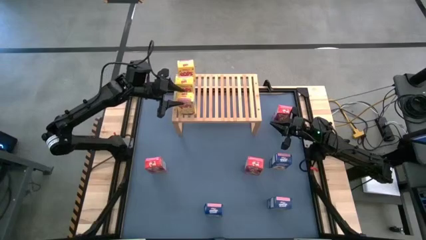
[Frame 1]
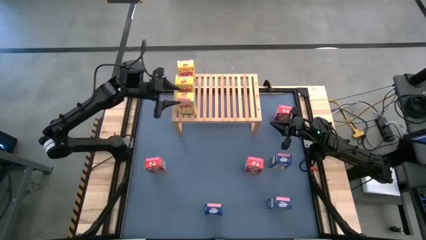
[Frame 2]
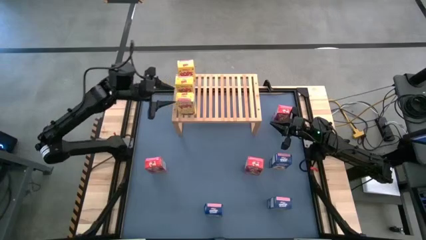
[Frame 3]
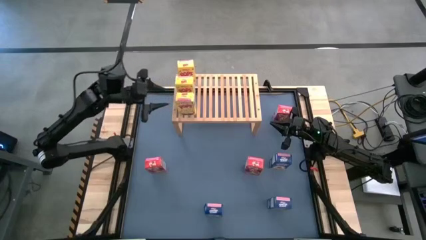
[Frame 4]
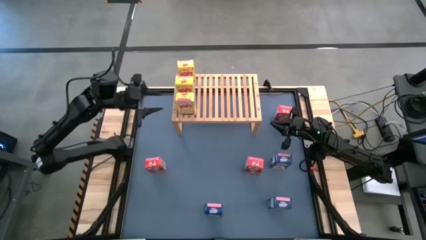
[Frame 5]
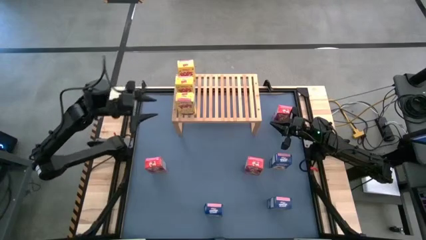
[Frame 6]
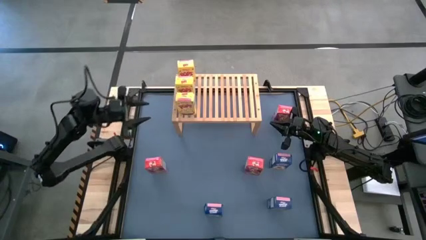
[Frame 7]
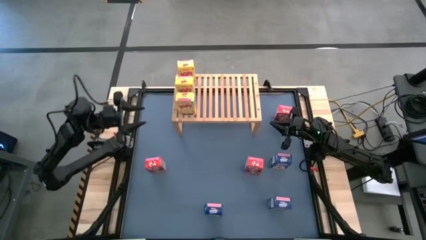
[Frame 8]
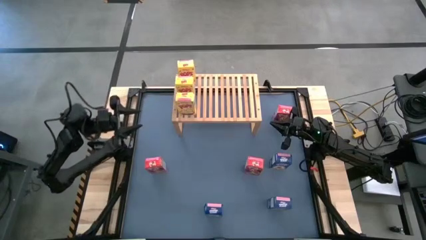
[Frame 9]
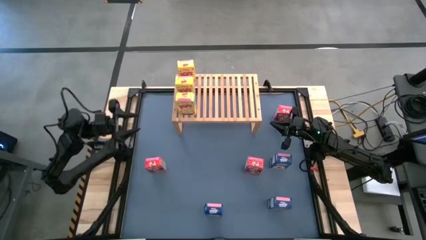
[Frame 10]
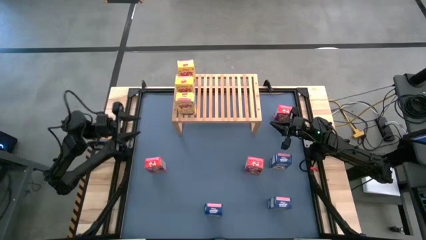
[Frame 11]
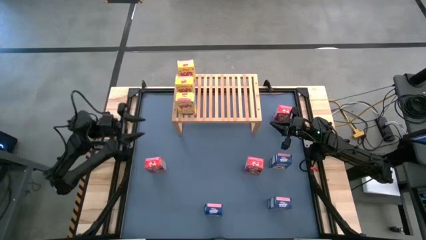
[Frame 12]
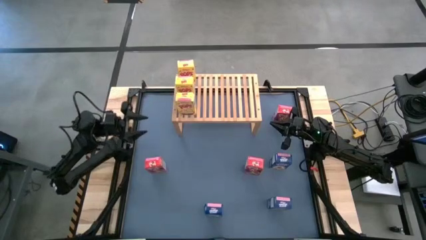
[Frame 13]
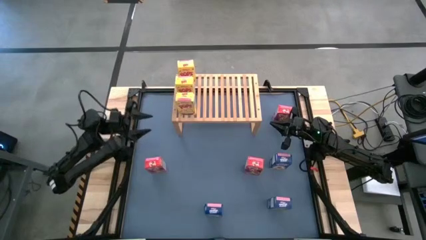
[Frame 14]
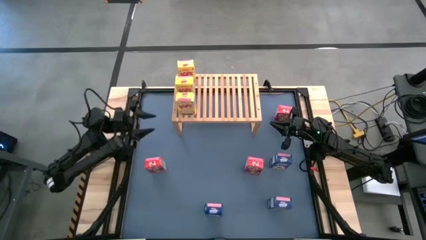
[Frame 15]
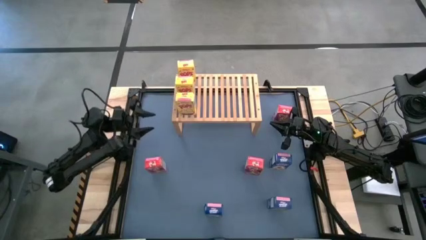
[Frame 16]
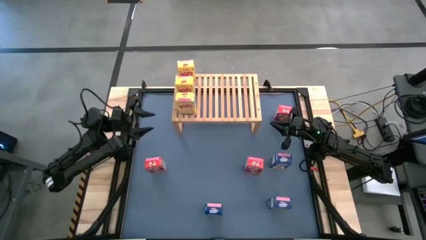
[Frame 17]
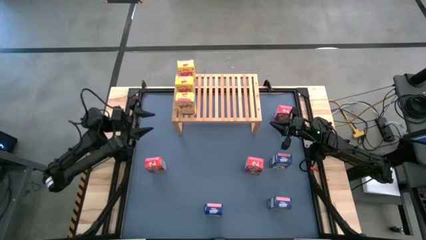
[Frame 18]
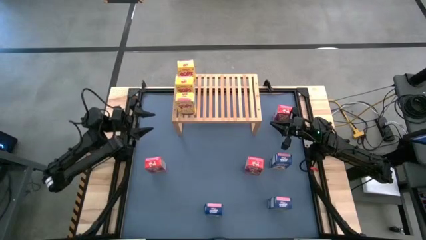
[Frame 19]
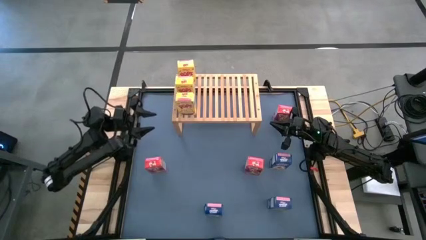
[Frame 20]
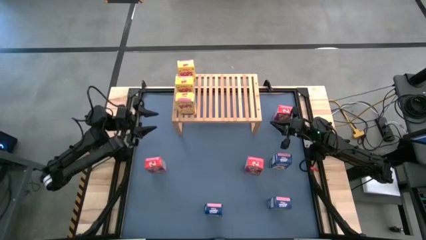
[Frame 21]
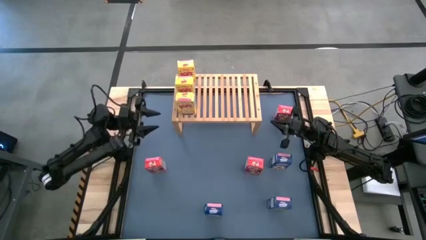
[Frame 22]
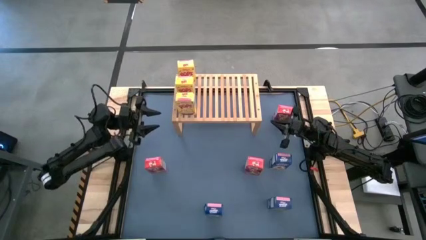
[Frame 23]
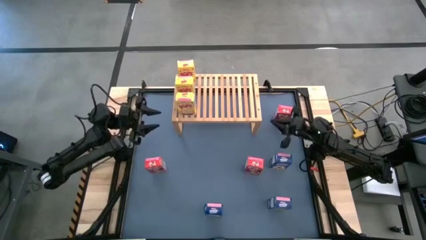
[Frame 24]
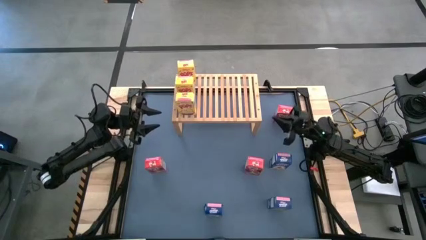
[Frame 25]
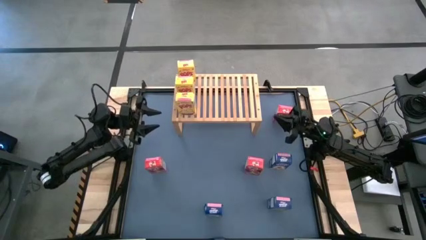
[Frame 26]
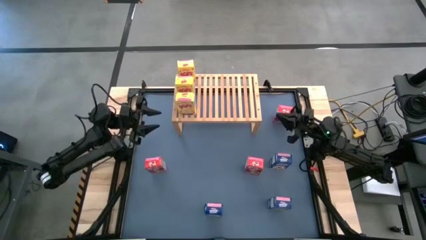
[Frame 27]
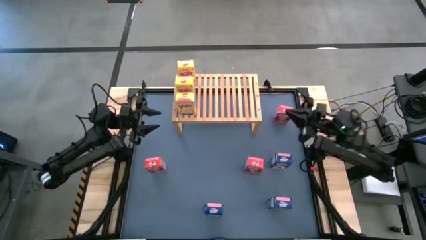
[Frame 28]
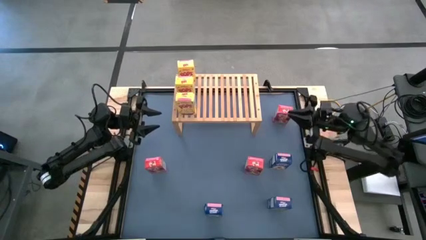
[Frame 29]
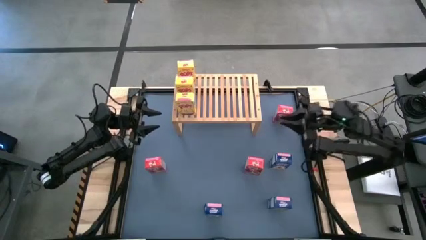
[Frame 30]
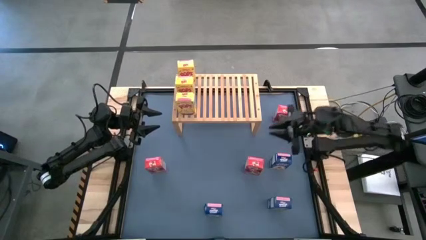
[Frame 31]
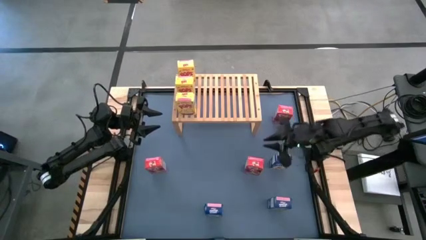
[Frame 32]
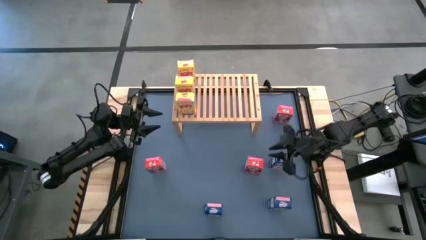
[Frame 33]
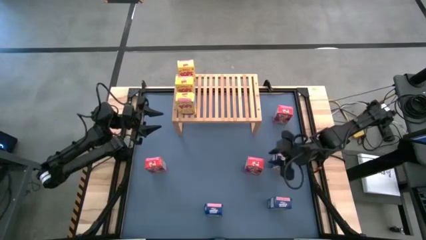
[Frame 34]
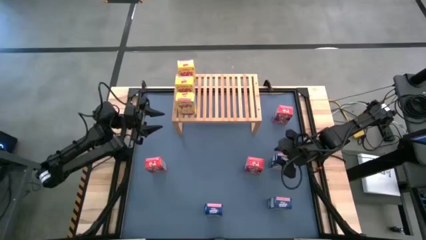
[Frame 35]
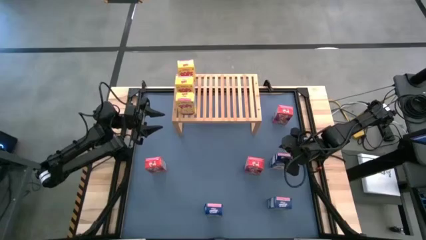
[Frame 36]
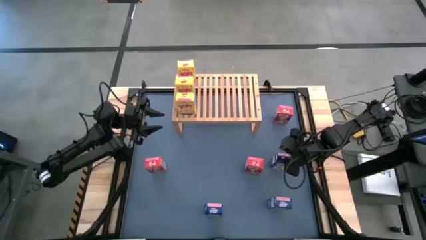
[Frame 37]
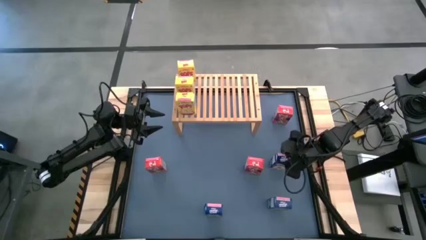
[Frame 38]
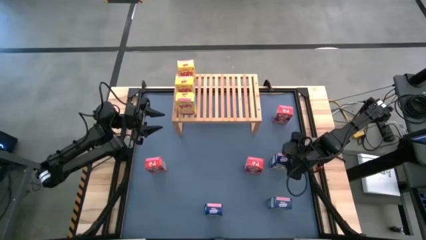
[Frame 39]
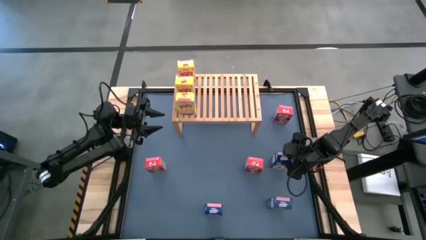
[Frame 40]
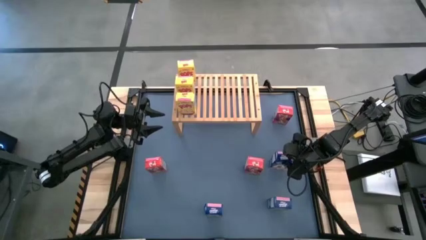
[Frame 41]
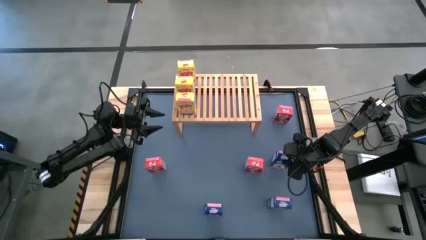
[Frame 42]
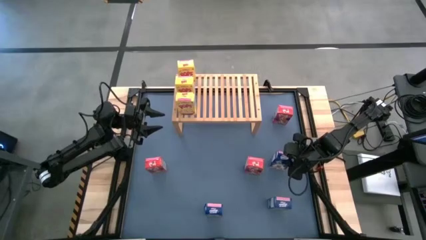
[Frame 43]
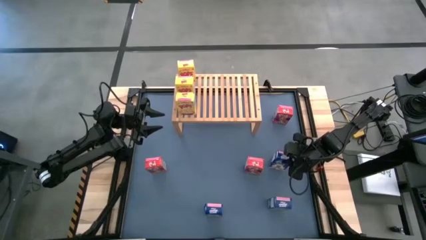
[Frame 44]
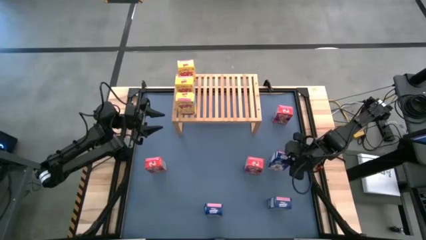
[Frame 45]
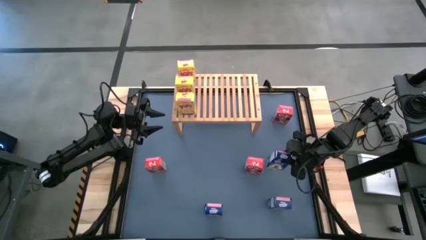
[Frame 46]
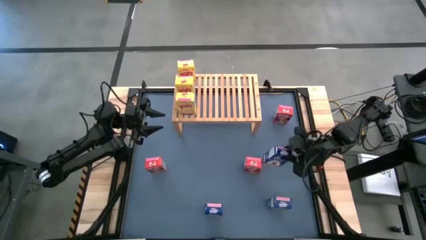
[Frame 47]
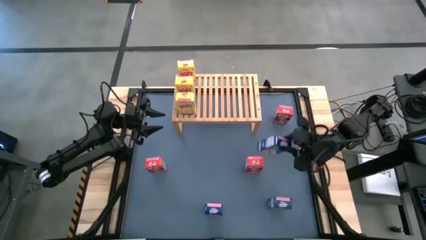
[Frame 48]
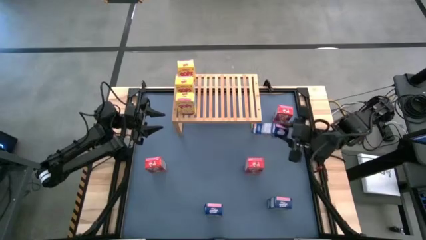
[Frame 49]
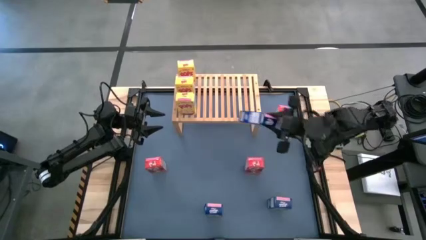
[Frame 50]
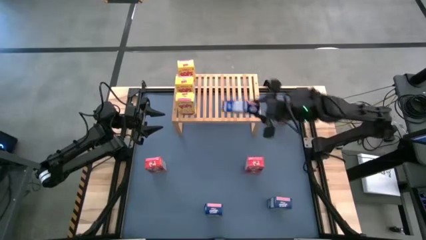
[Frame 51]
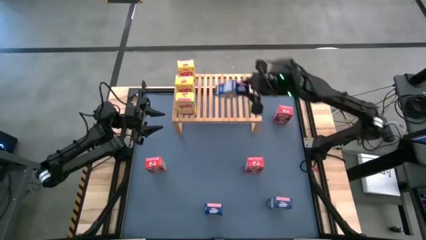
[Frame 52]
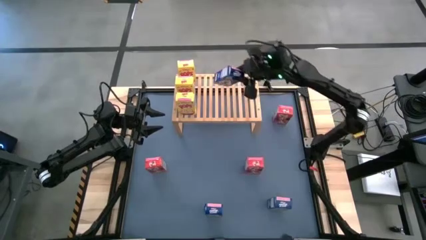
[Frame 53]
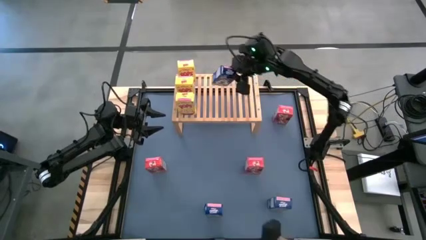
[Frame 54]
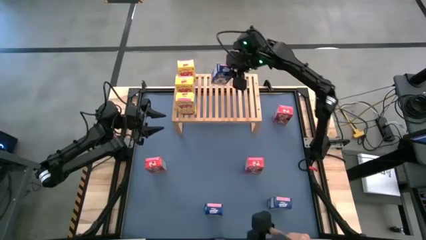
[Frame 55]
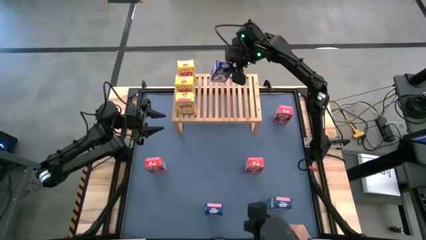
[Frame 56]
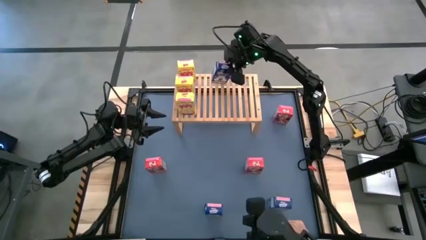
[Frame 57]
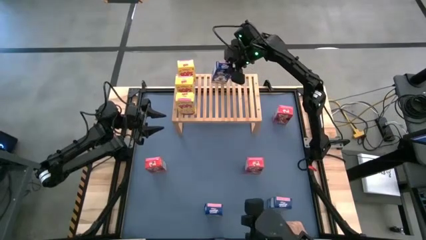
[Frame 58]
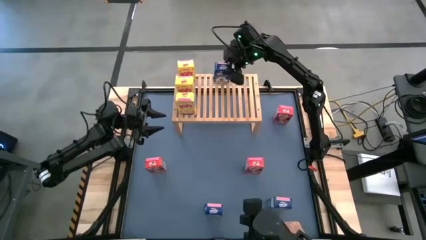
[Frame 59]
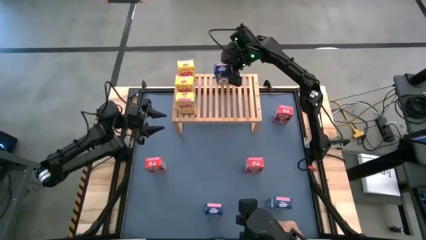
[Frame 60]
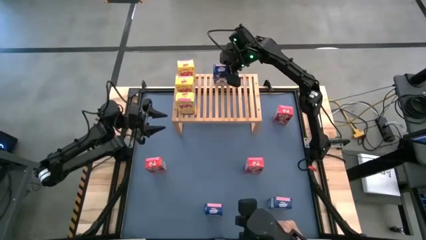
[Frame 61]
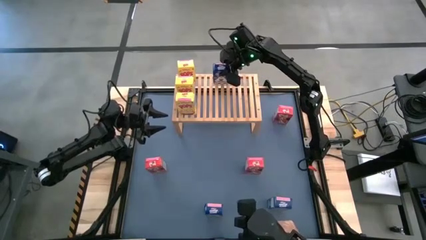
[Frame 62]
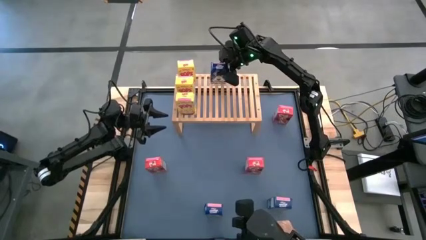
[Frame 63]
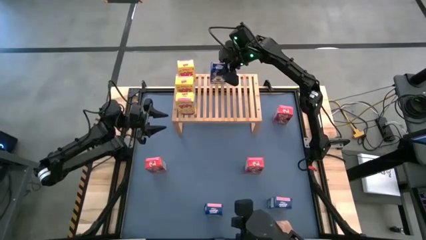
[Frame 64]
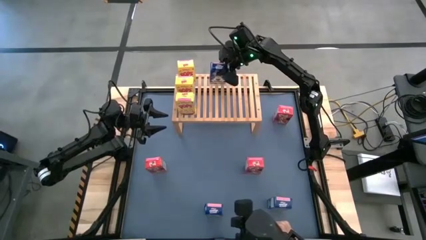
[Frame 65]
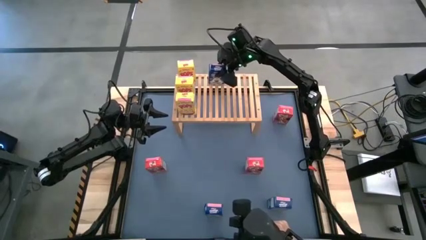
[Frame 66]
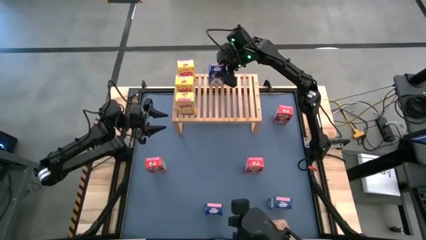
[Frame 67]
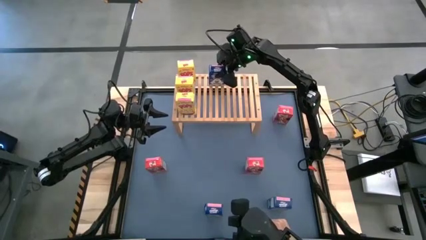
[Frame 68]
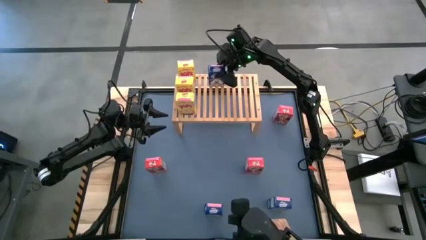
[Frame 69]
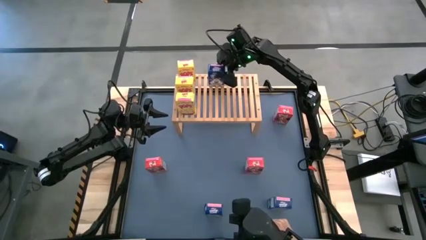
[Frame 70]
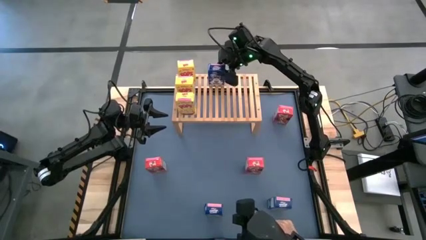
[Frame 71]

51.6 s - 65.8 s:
Task: Stack cereal on shelf
Put the top right blue cereal box on the shelf

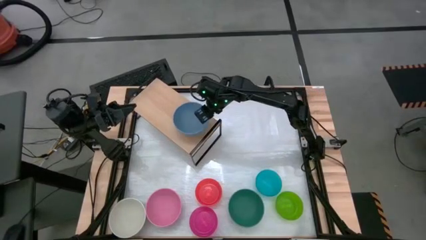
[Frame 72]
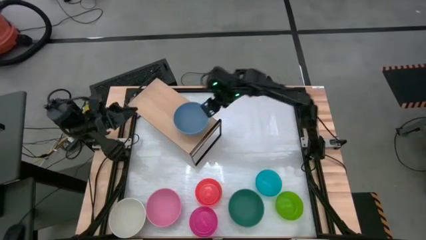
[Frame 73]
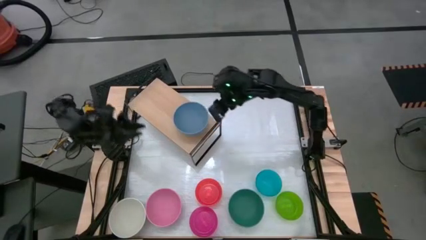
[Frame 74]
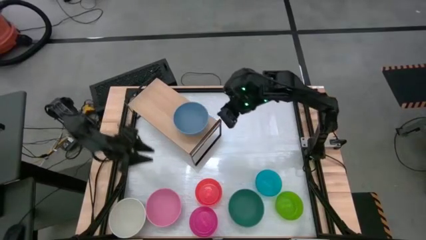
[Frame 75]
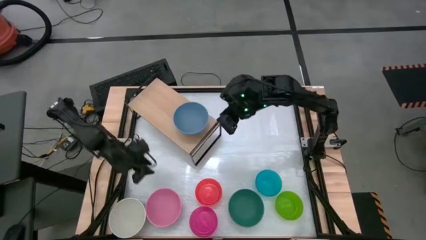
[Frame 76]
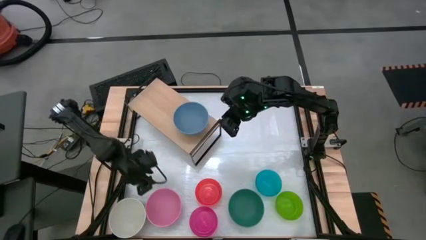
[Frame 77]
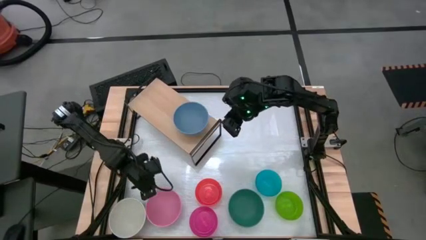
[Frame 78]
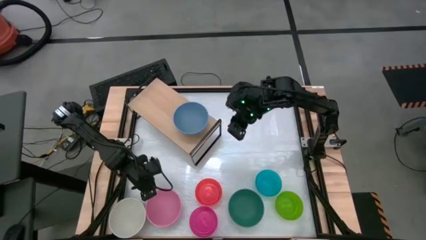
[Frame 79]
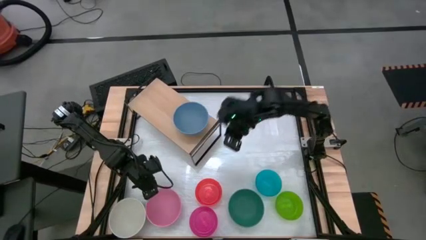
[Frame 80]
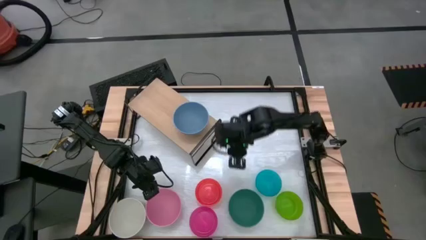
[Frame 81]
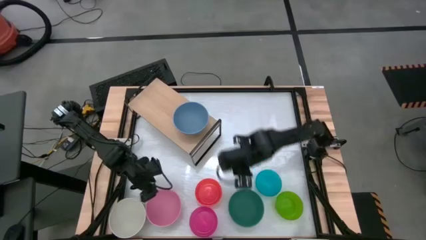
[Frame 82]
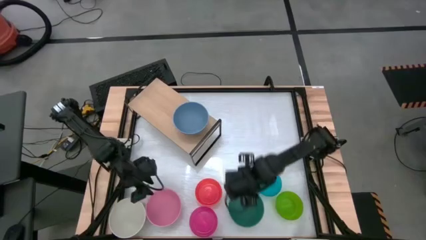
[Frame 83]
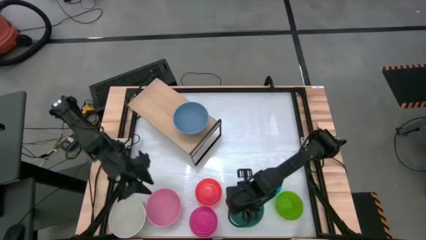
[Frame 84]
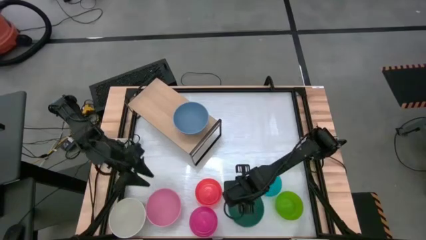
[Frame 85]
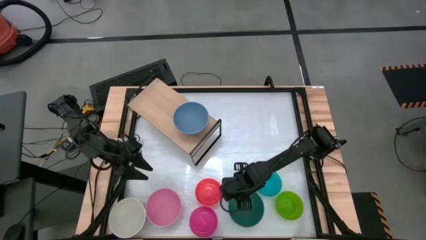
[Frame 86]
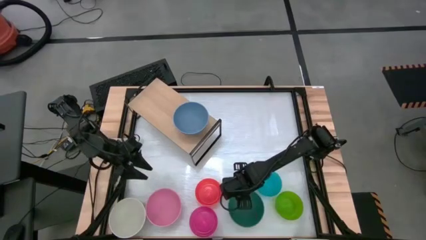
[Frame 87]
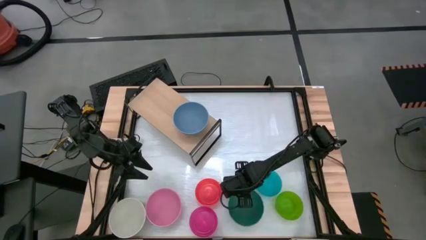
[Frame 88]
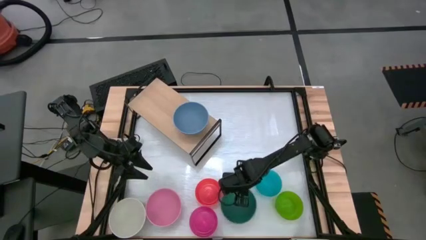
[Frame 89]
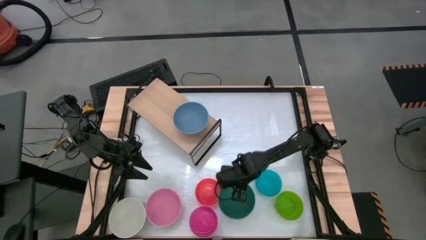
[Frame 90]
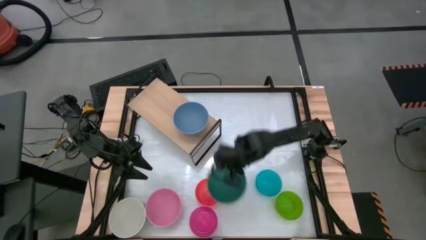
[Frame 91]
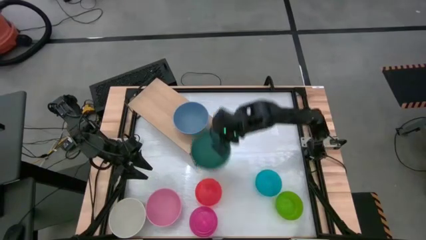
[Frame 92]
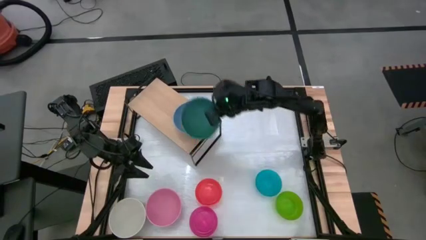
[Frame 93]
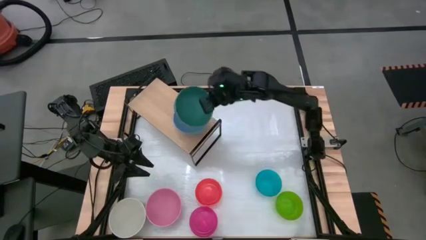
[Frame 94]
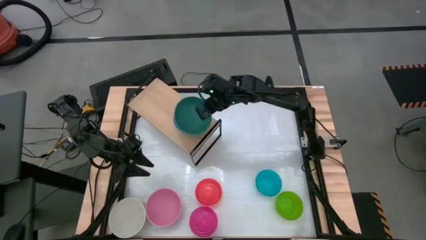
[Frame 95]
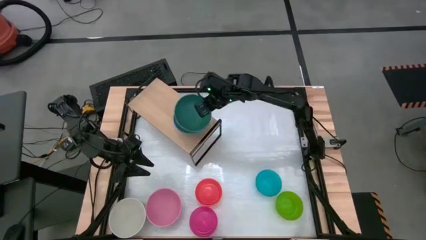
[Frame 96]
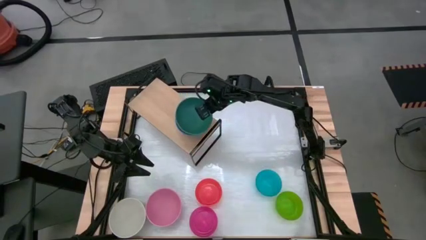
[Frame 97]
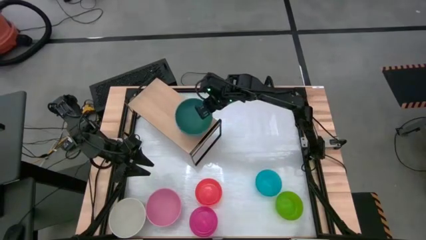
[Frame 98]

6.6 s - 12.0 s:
Task: Place and stack bowls onto a shelf
Stack the green bowl on top of the blue bowl on the shelf
